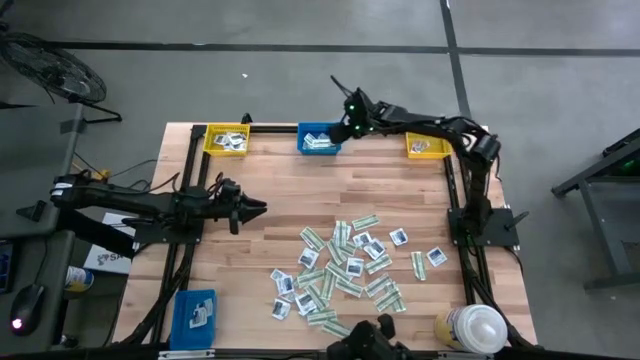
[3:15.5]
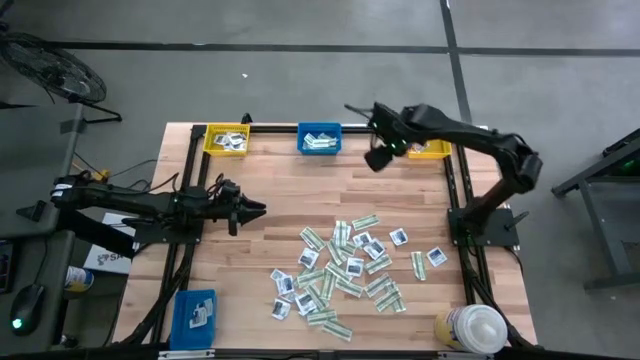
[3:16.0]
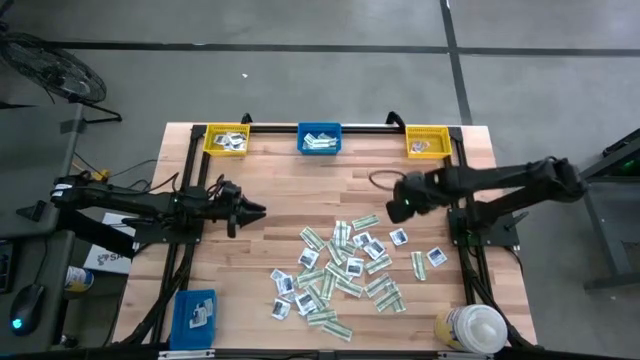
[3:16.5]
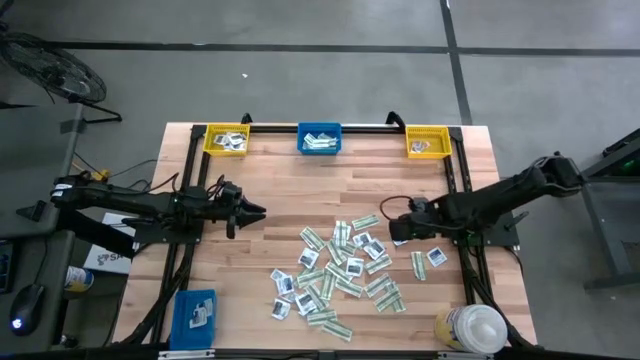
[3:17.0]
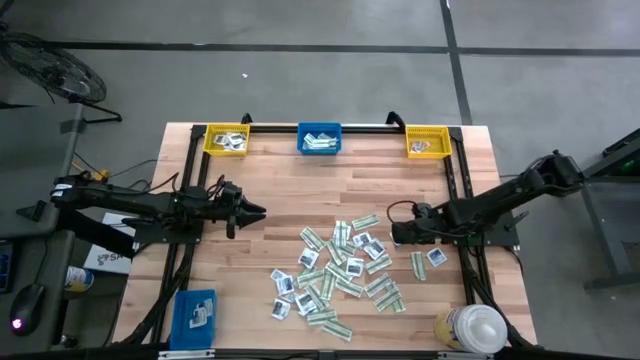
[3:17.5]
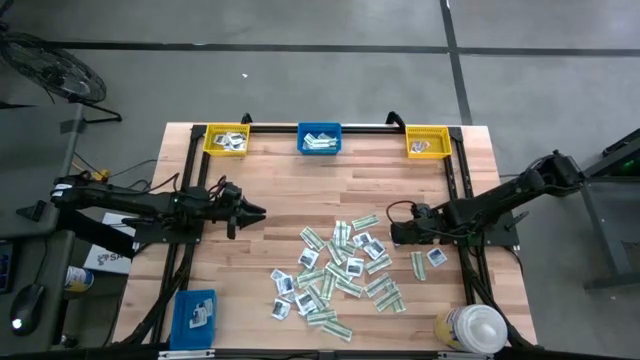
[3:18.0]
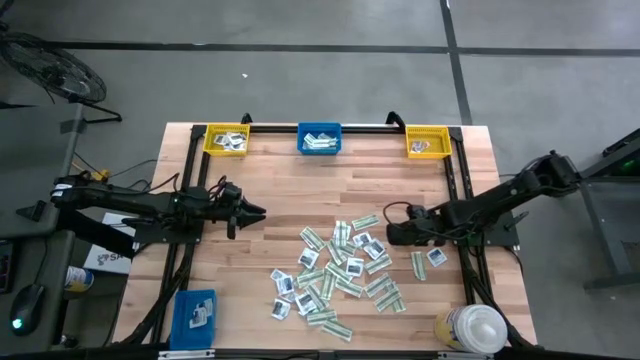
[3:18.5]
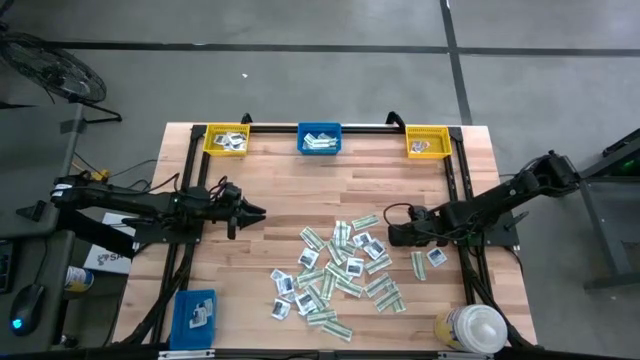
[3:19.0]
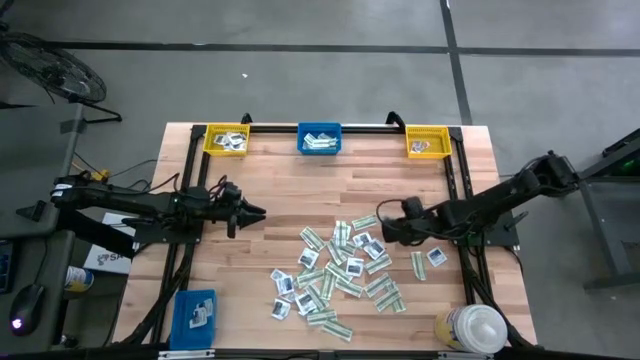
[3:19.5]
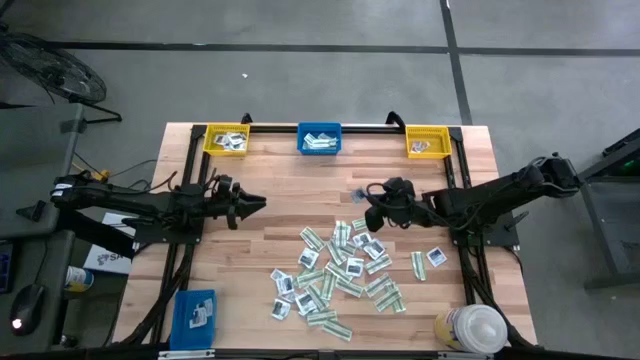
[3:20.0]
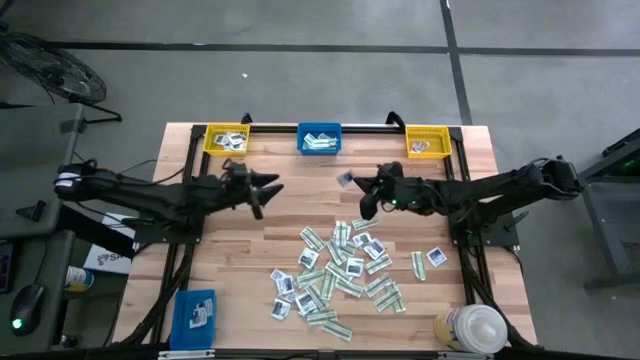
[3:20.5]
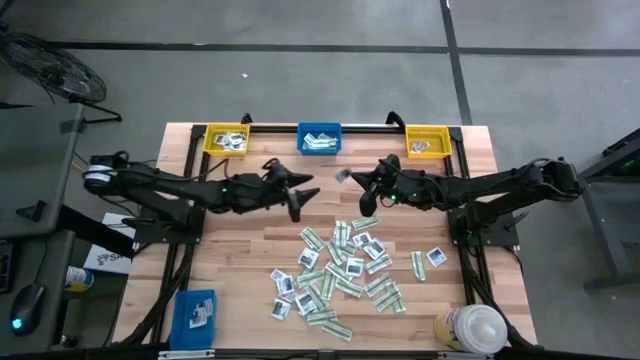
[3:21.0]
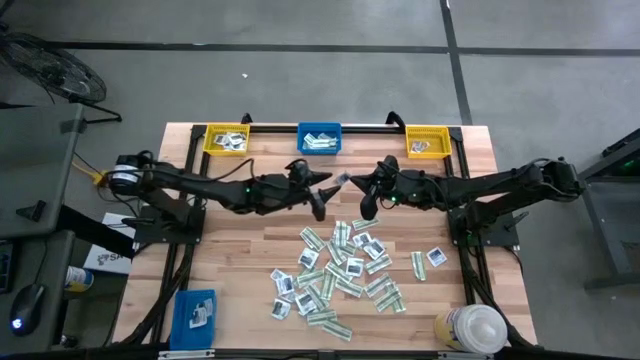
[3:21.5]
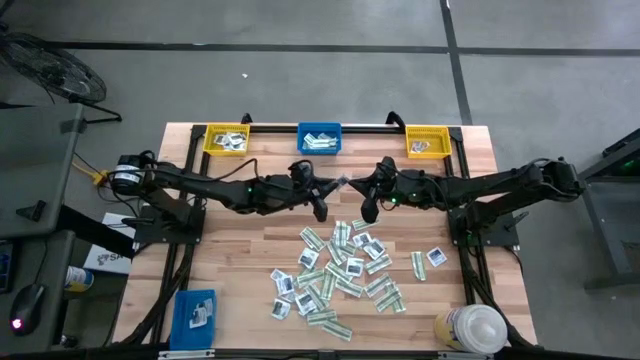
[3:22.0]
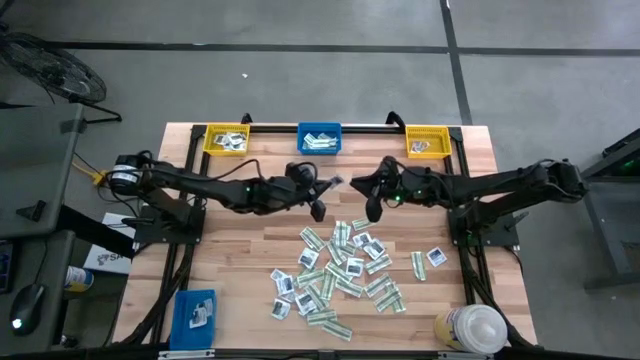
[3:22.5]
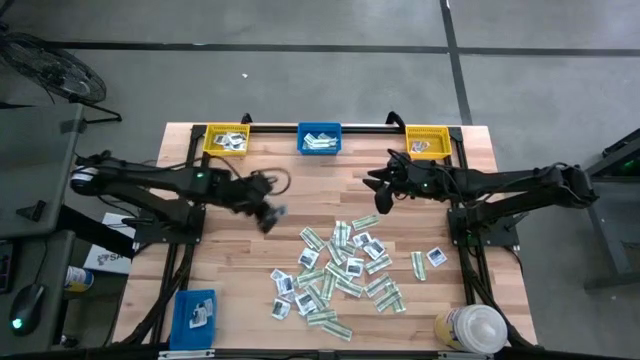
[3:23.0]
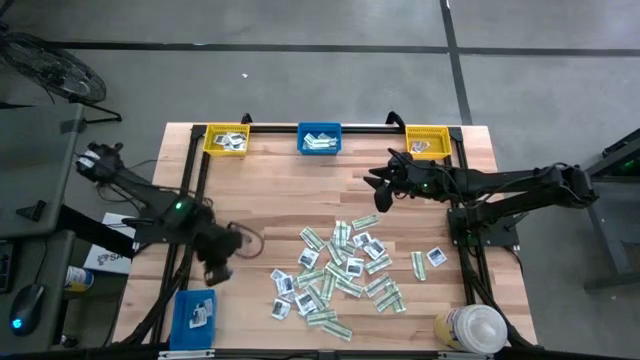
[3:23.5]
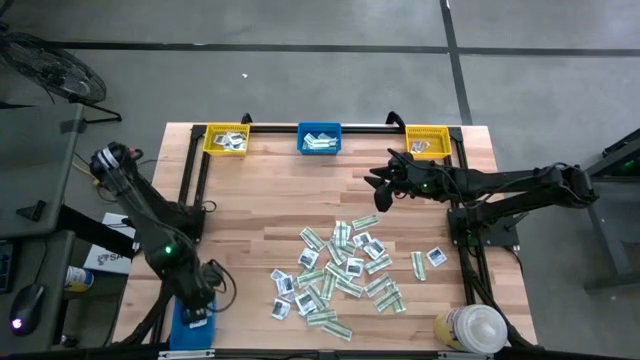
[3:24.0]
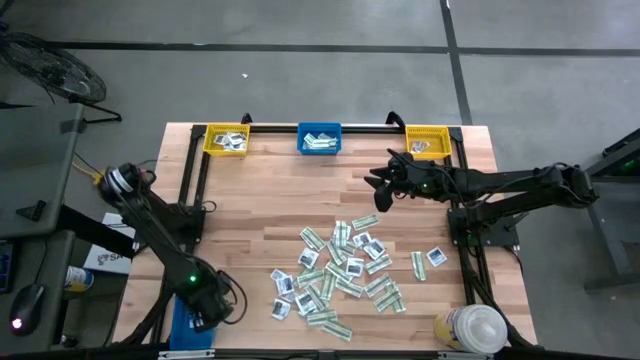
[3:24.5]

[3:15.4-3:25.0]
Task: Pick & Place First Aid Supplies
Put the blue alcohol pad into the bottom blue bin

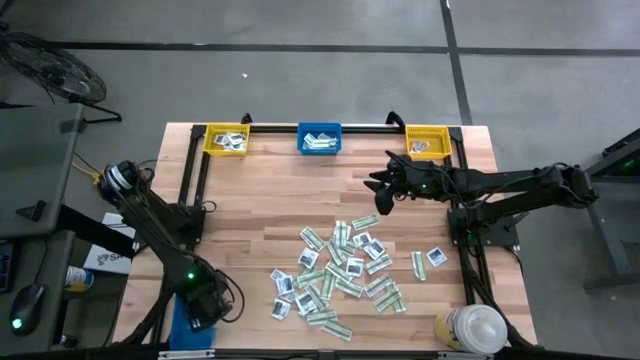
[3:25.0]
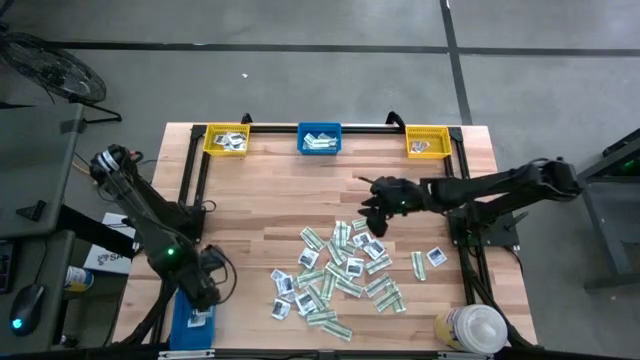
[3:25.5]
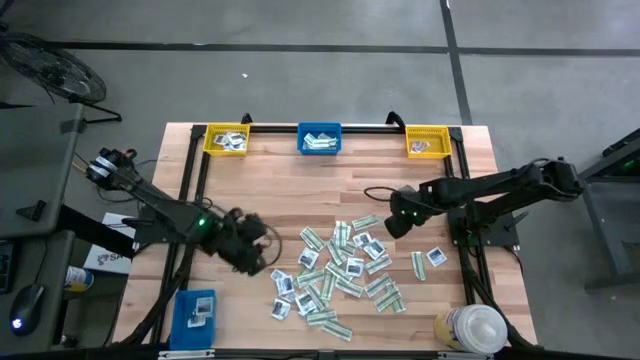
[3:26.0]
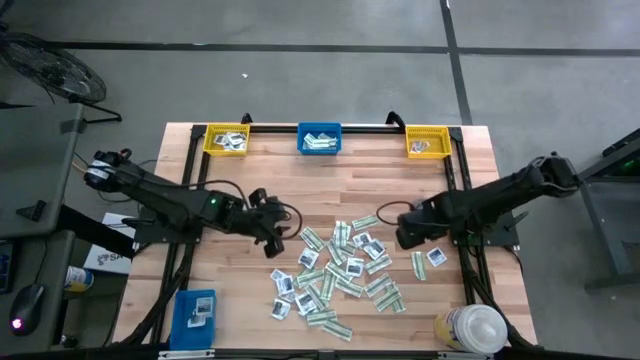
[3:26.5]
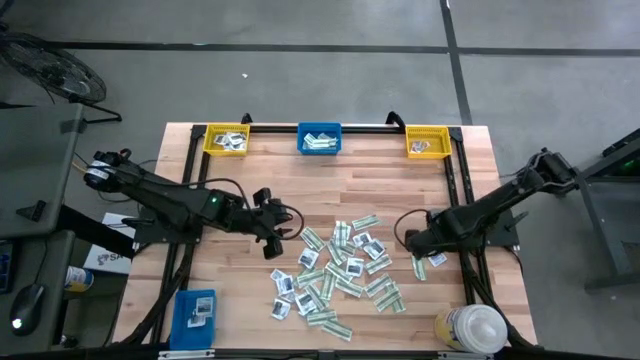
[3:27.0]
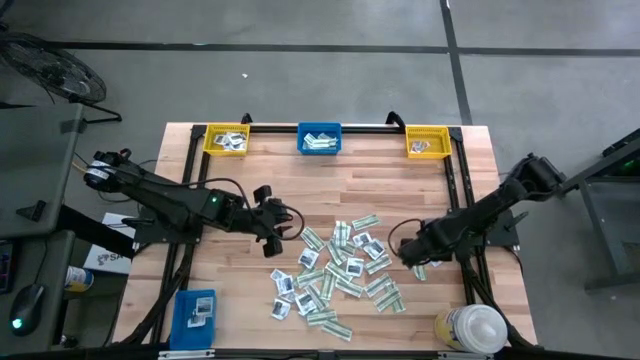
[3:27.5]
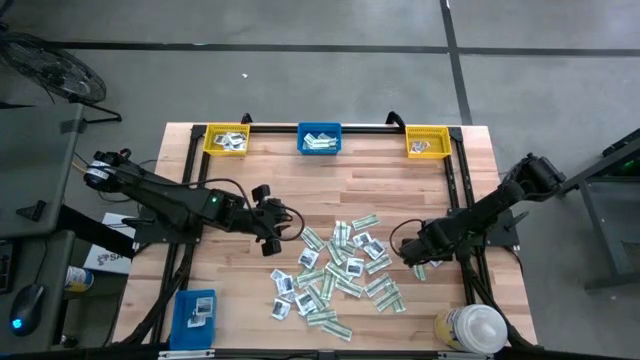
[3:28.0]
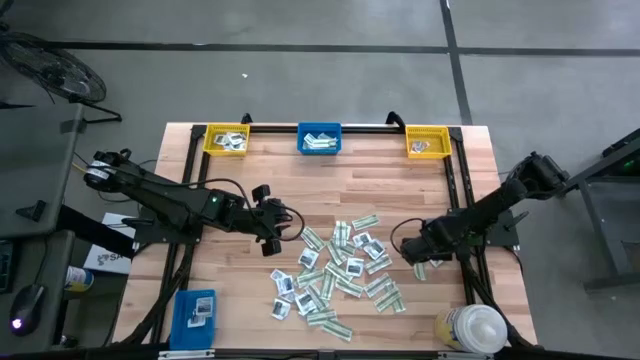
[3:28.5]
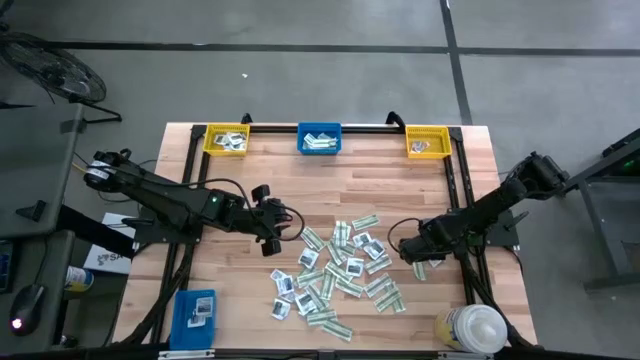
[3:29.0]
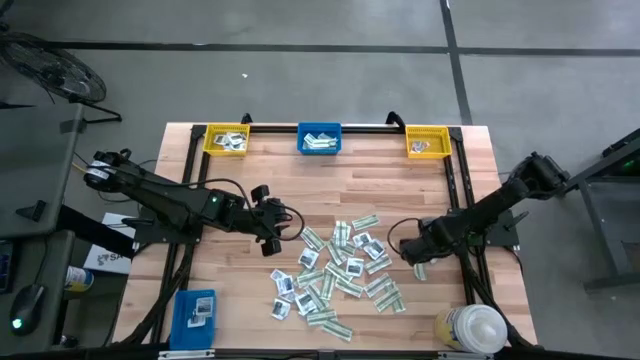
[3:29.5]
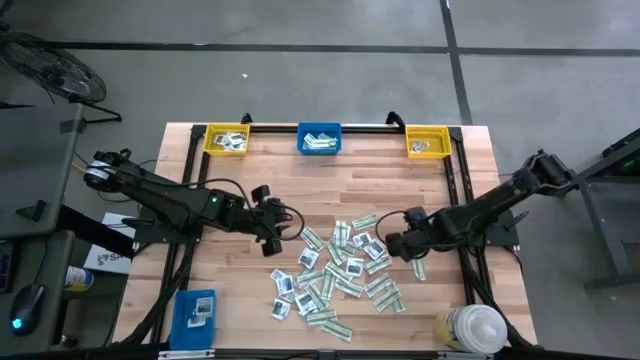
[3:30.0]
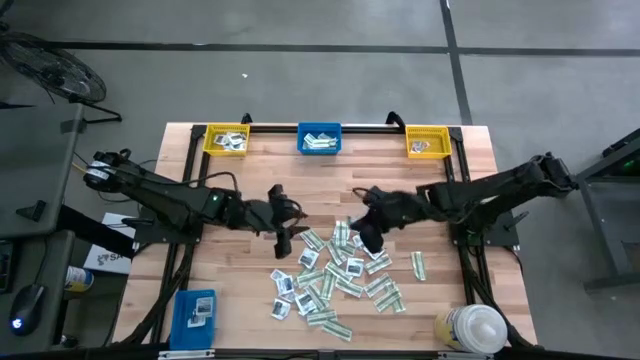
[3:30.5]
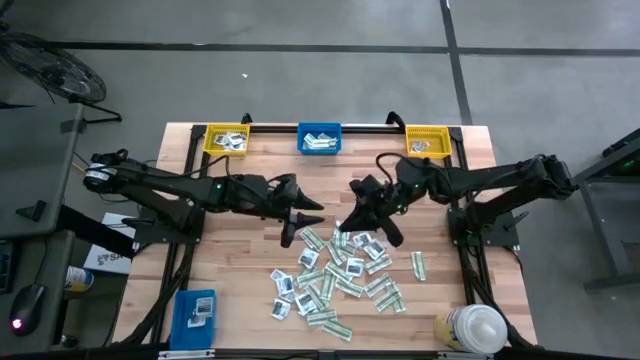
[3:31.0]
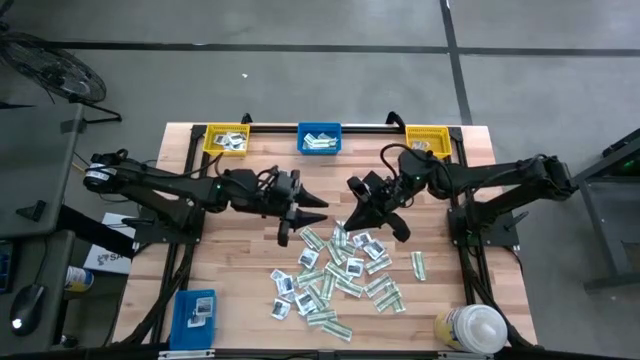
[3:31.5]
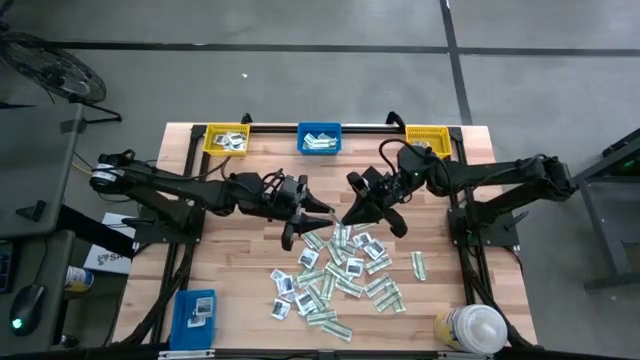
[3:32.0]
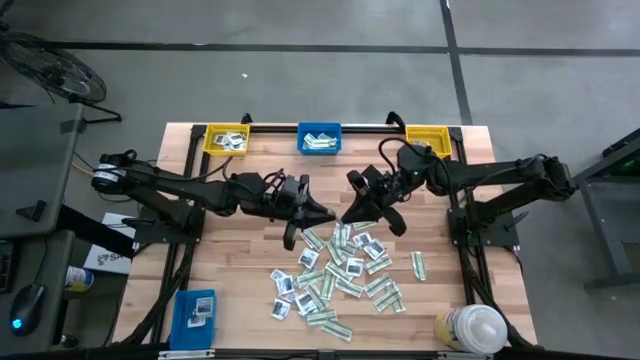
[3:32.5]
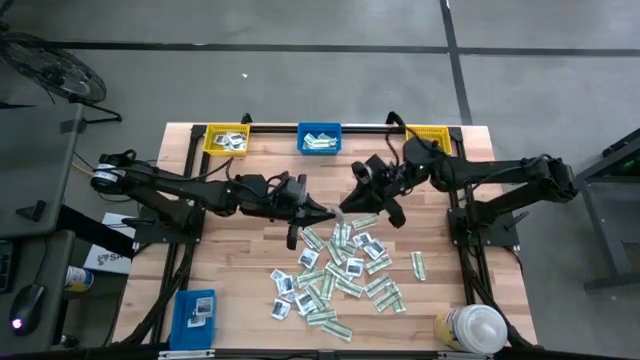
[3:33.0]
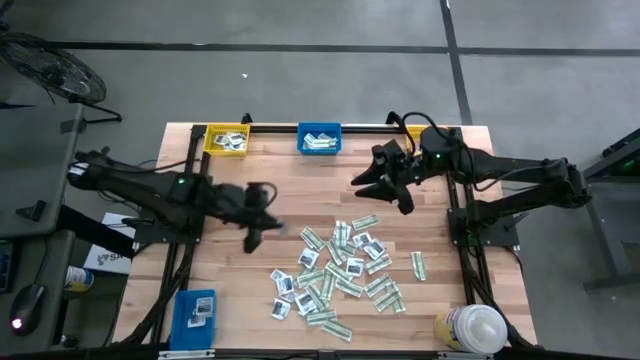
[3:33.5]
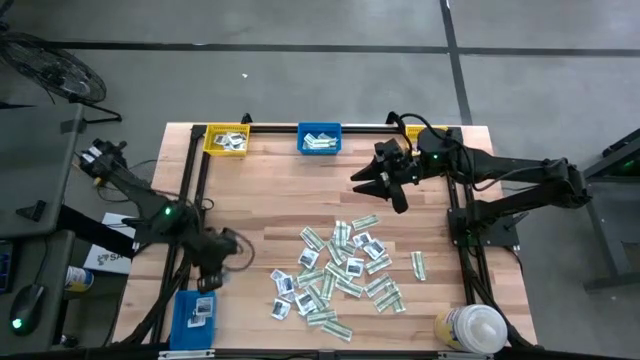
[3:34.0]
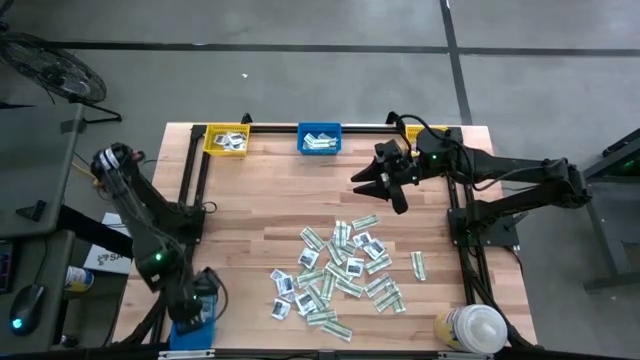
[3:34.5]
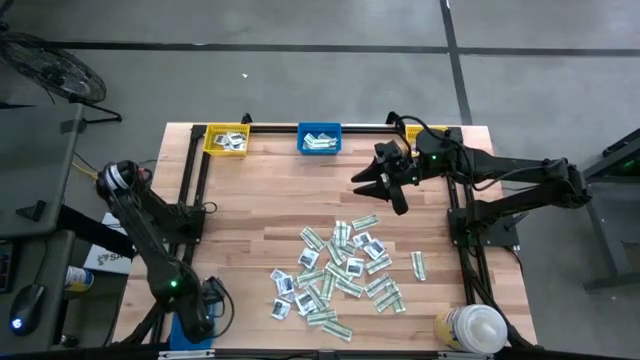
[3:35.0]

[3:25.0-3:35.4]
Put the blue alcohol pad into the bottom blue bin

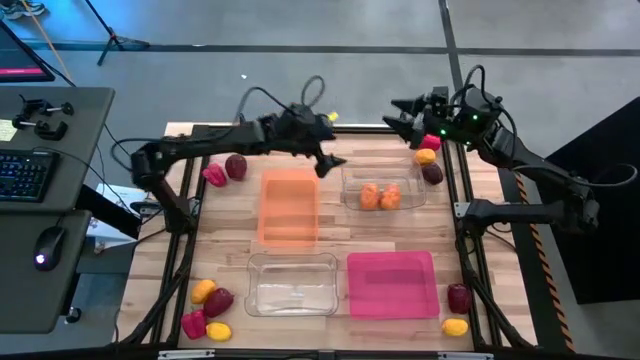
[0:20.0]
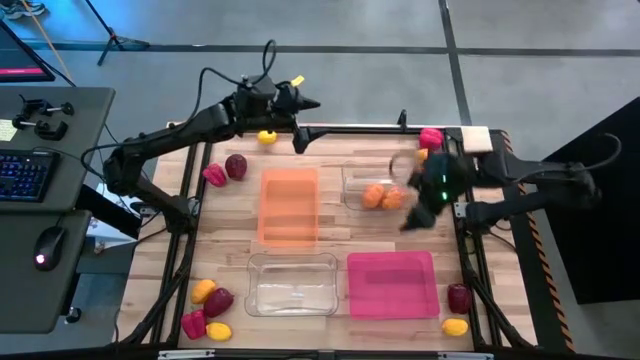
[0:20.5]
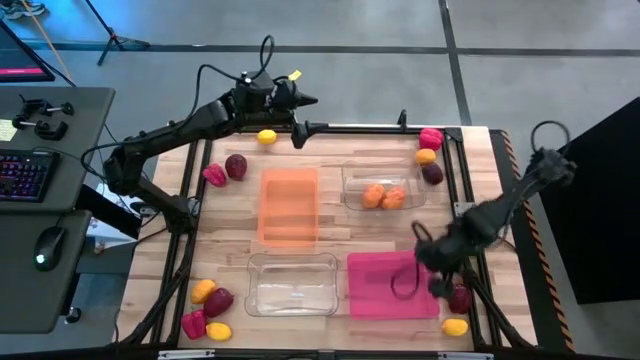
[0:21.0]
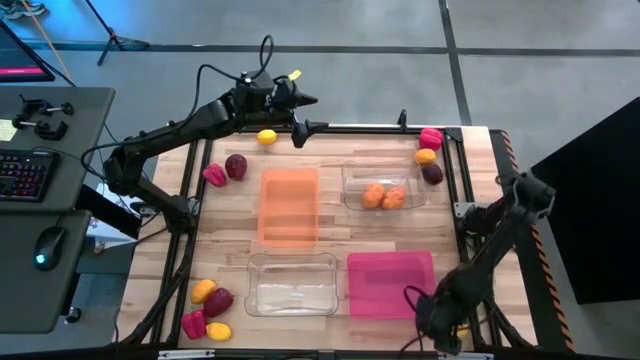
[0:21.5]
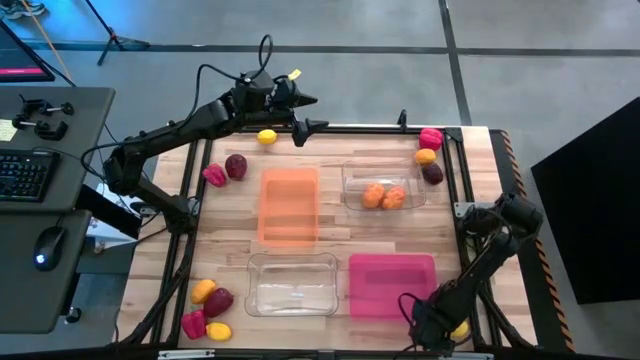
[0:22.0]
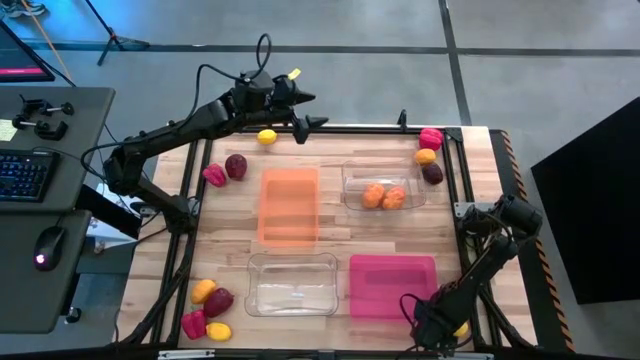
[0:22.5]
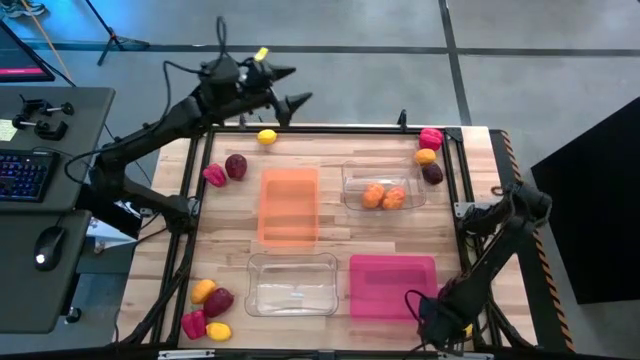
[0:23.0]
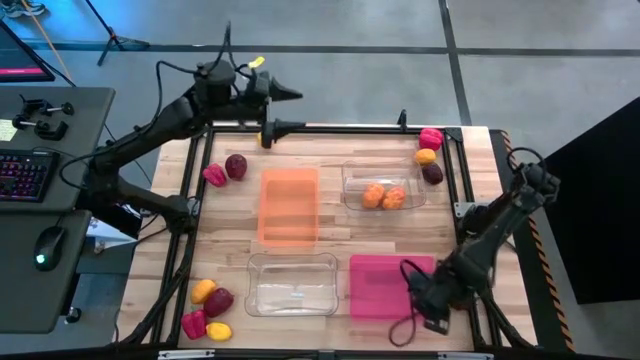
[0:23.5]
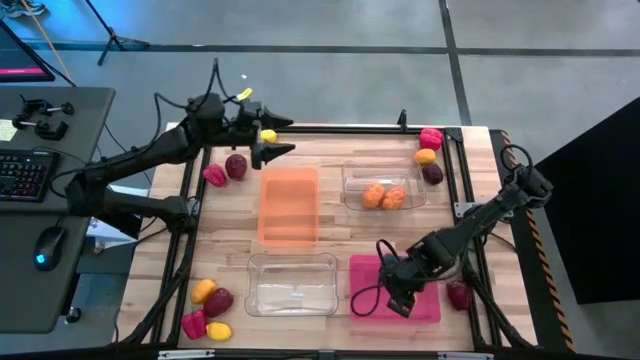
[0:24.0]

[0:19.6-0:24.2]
Task: Sort produce into baskets
Put the bottom right lemon into the pink bin
